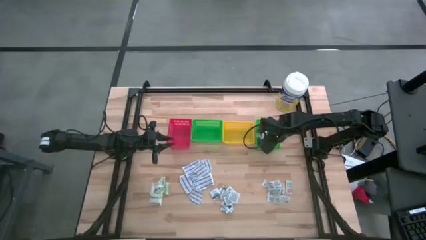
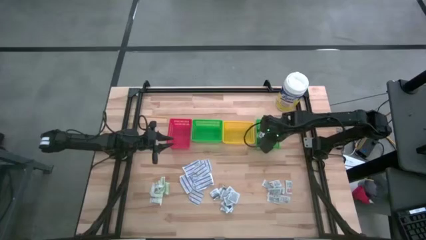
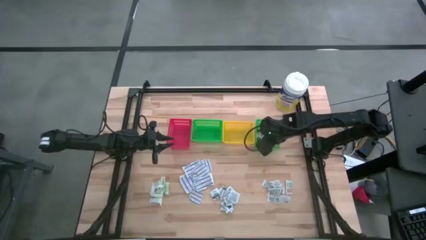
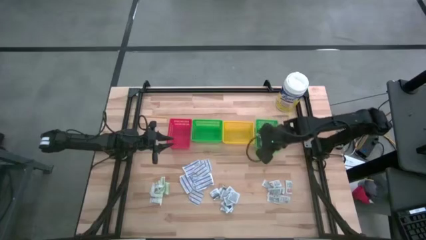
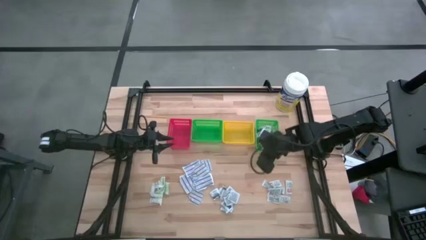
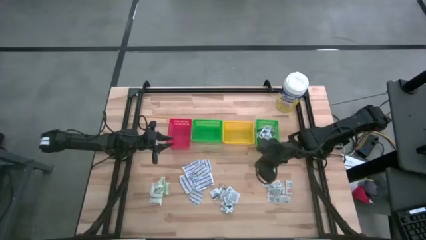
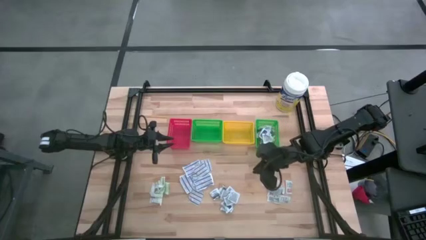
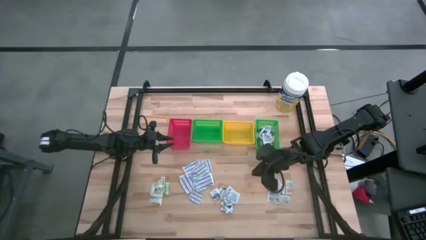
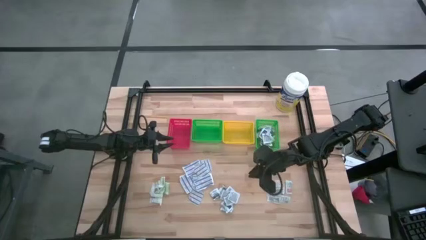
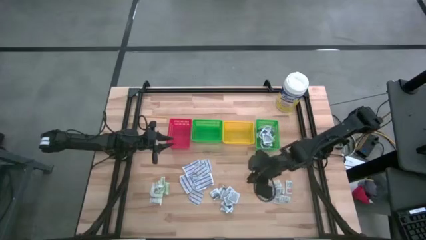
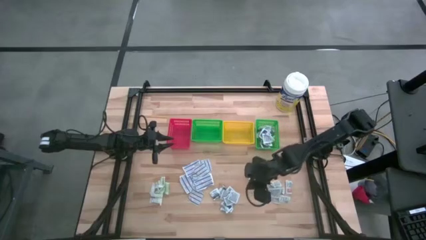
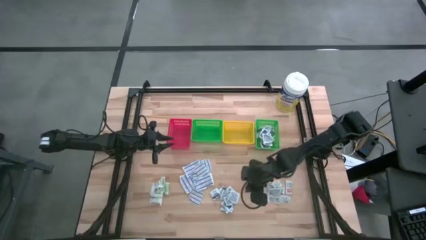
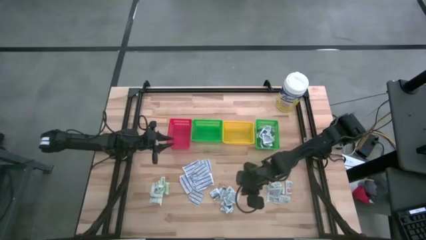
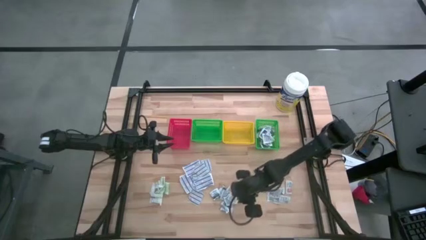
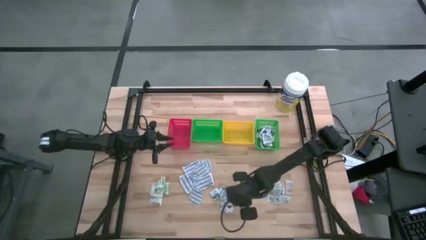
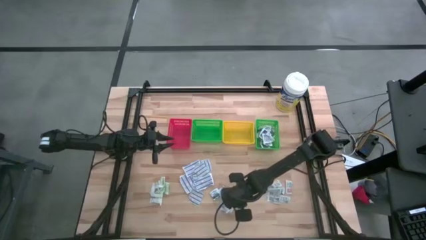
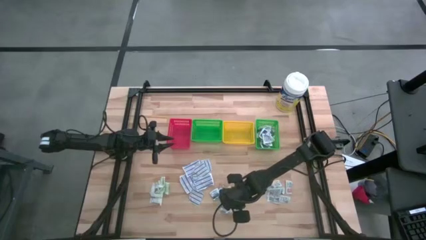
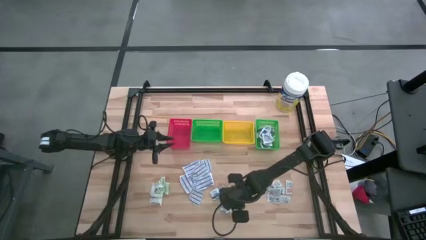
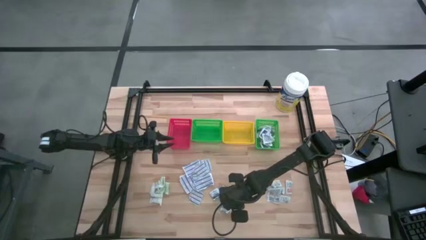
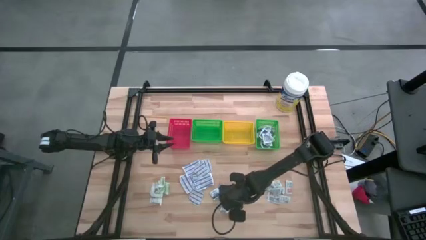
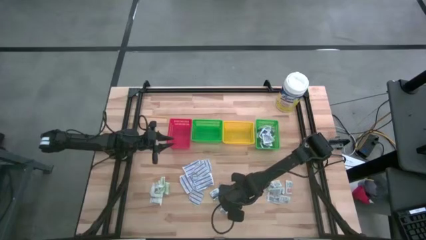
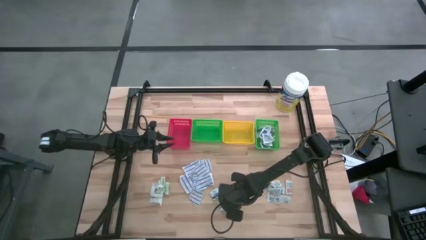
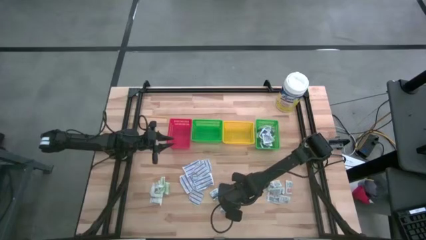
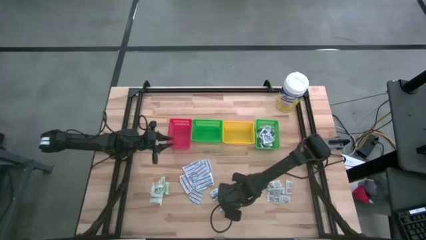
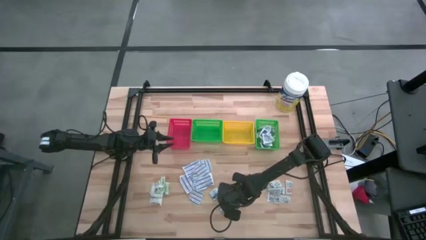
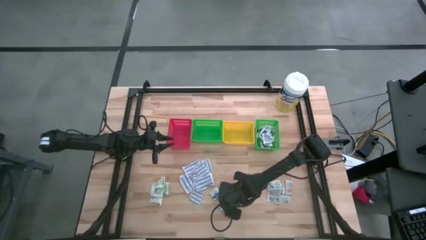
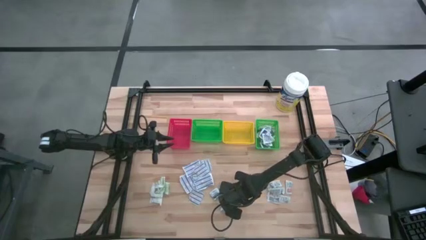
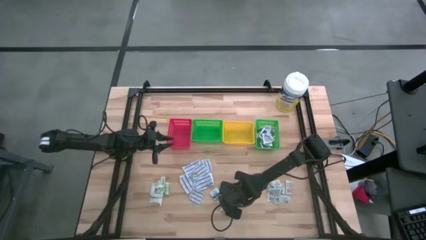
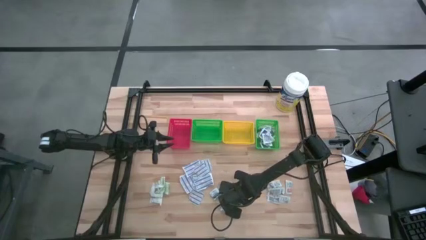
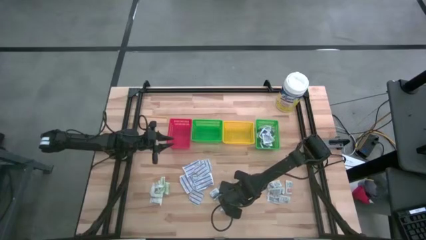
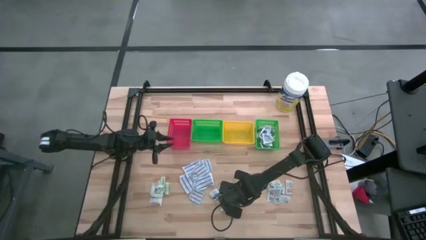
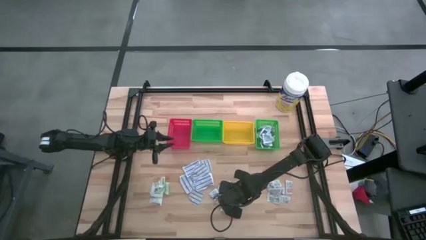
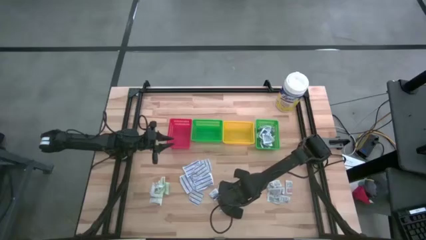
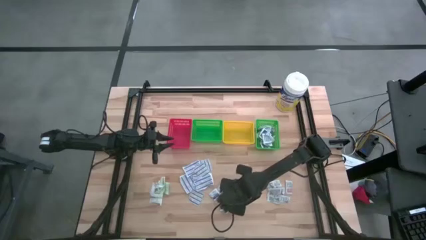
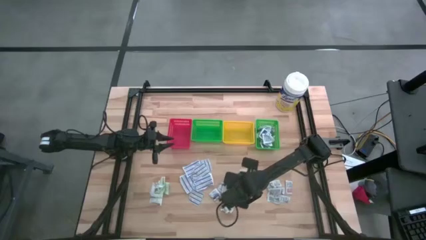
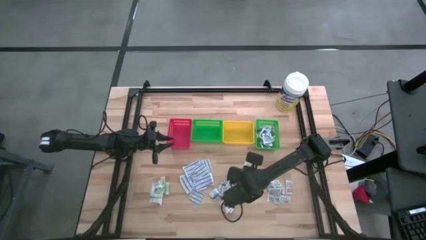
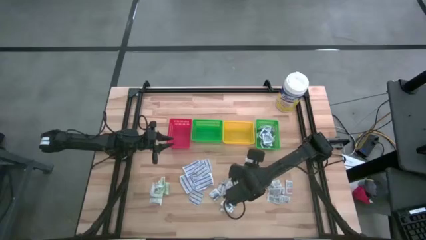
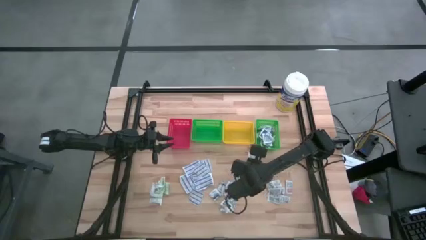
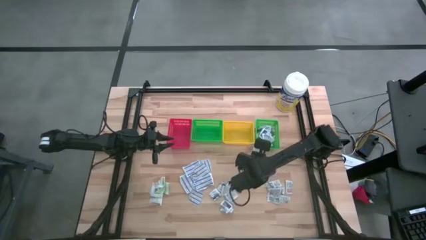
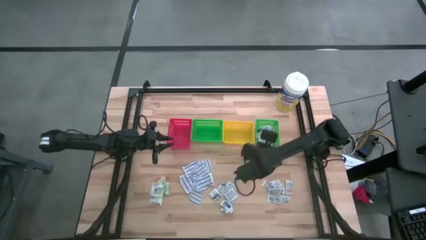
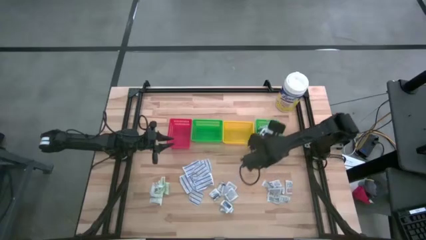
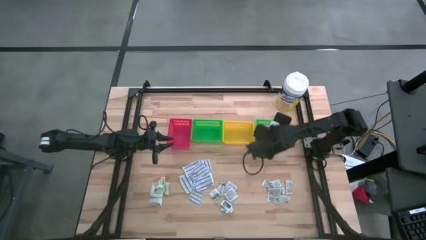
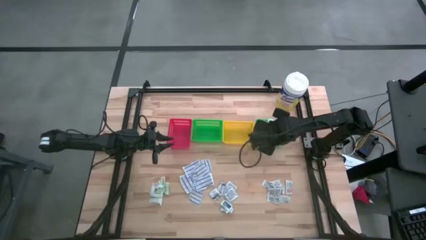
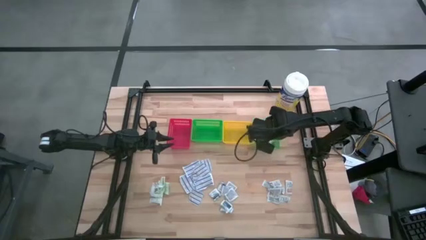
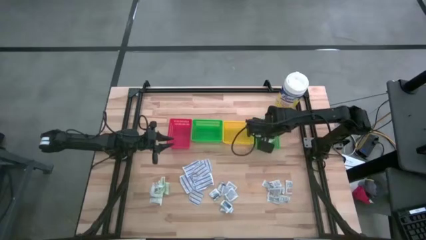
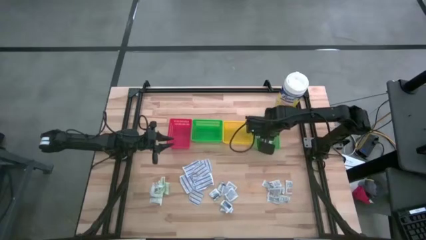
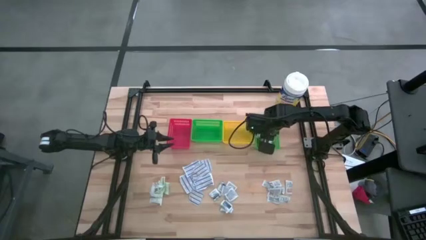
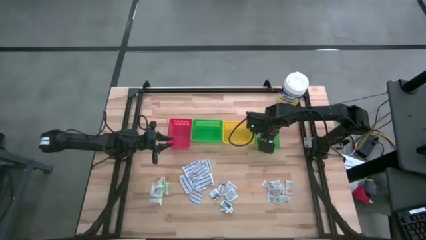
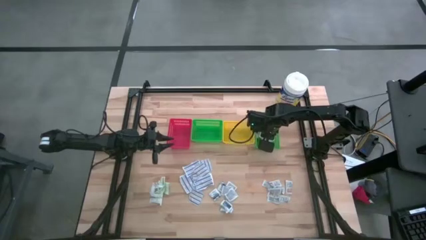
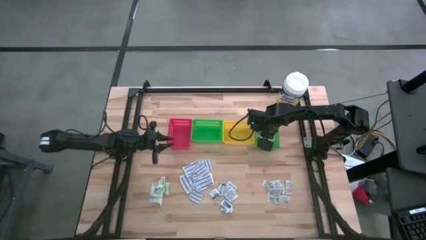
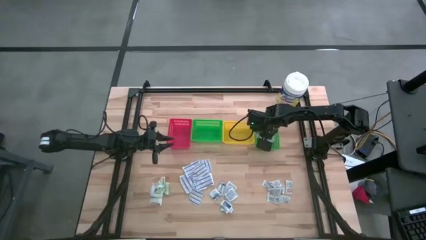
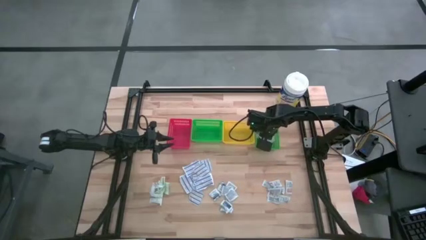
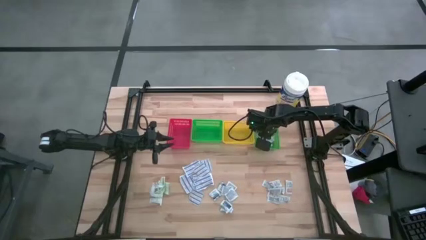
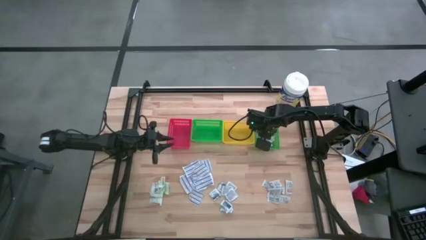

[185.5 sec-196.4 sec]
Task: Pick & Place First Aid Supplies
Put the blue alcohol pad into the right green bin

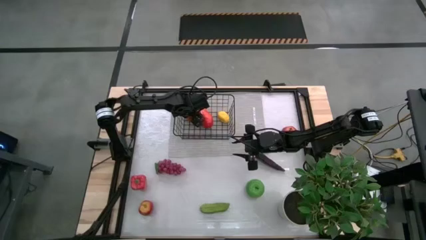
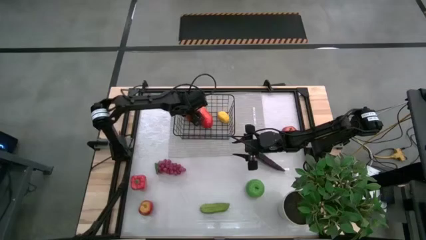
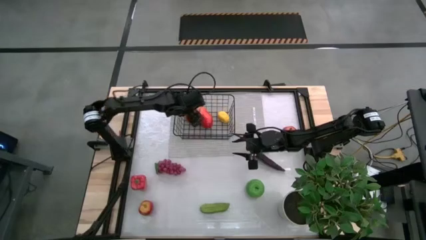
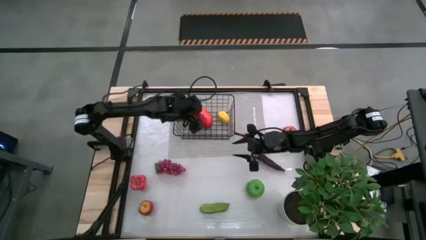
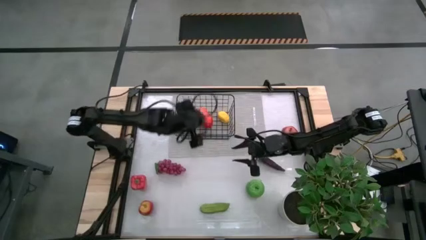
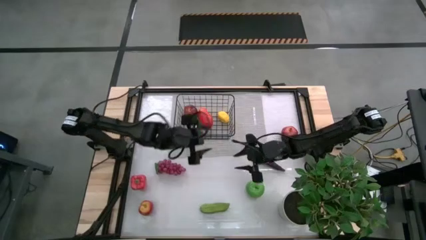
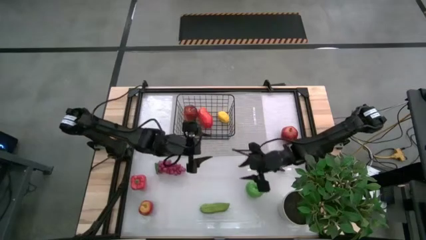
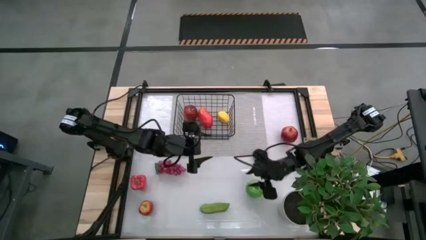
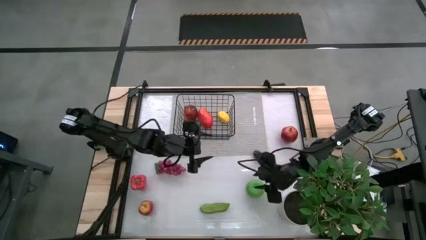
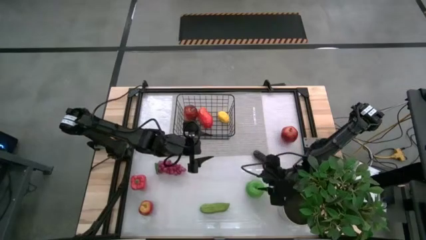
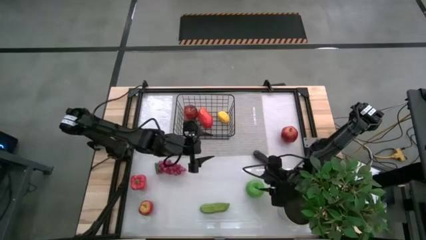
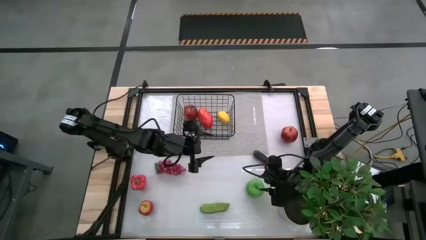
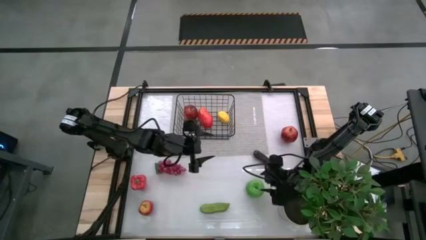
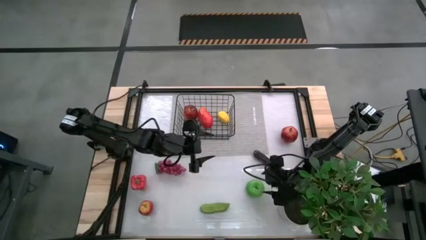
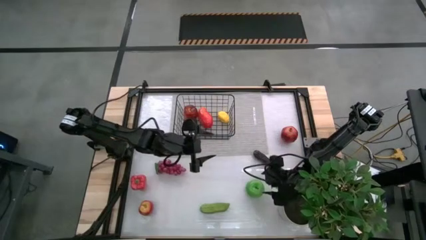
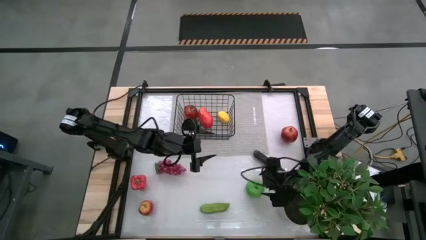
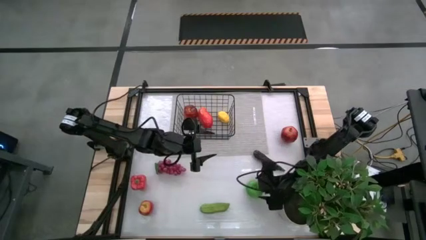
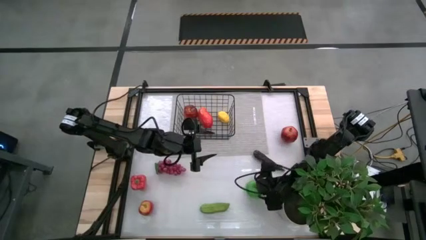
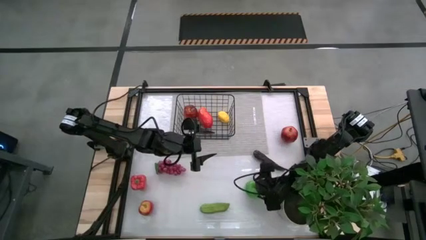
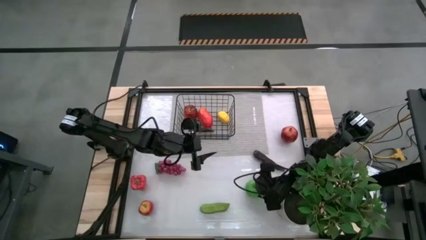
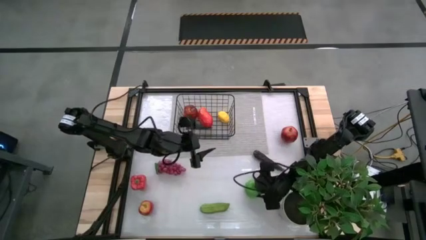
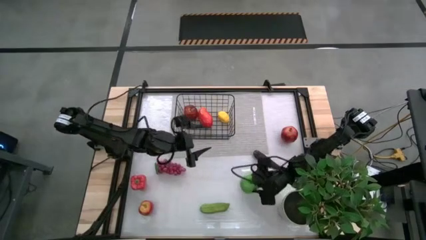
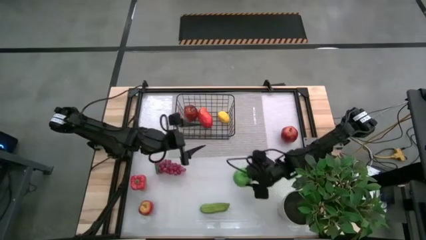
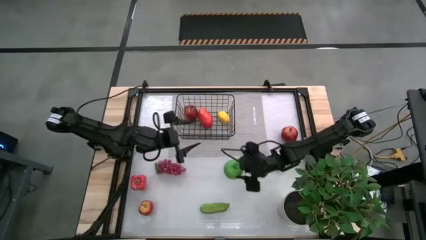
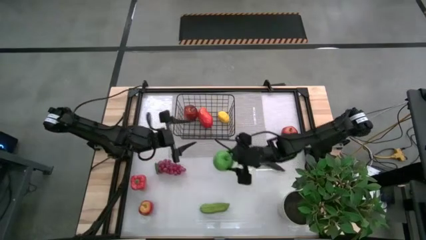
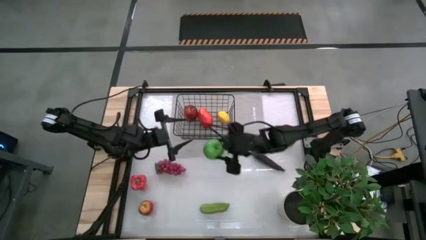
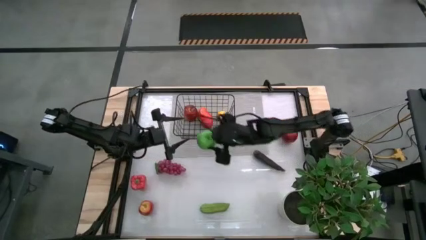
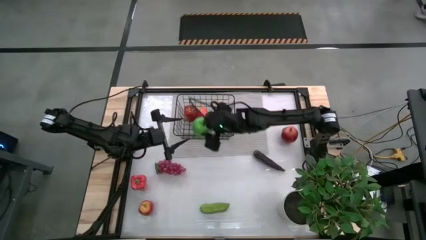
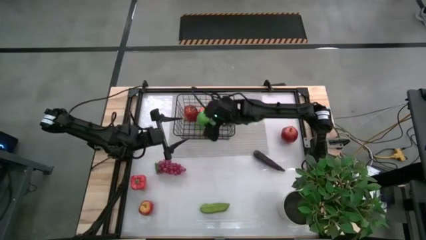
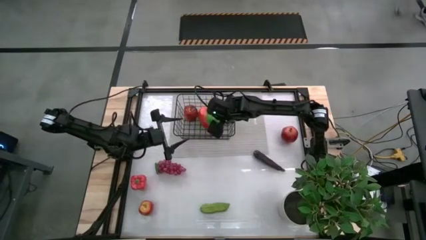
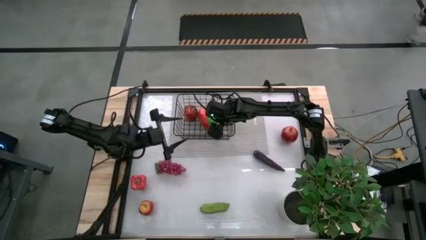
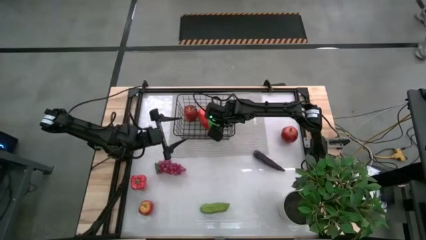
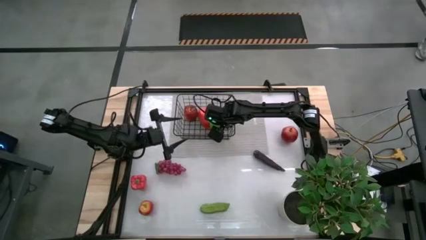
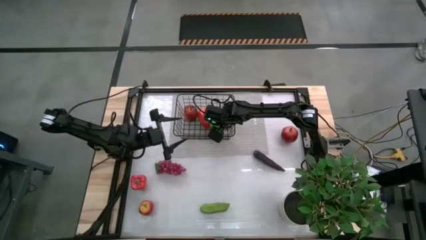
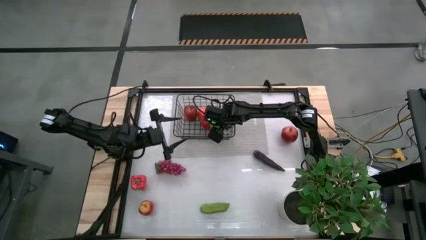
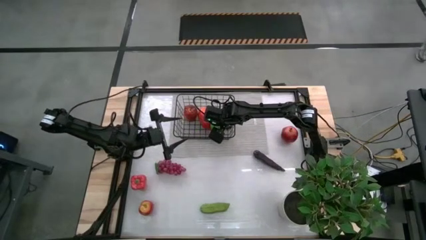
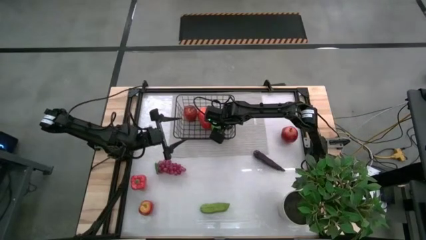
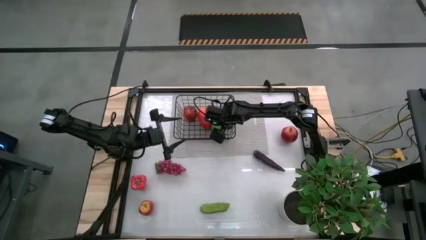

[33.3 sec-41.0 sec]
Task: Build produce basket
Put the green apple into the wire basket
